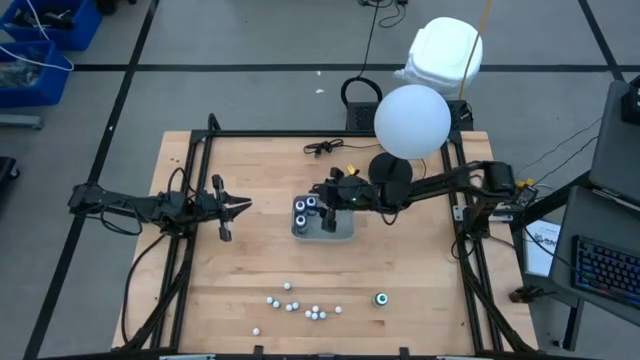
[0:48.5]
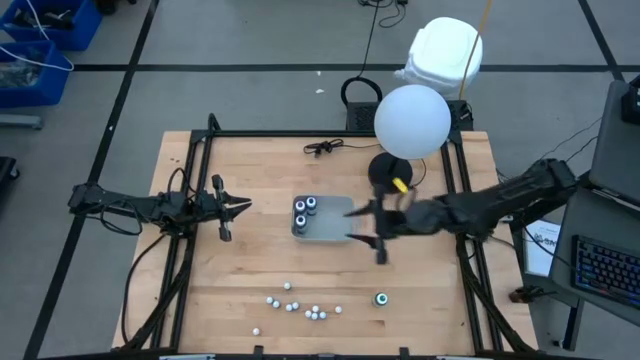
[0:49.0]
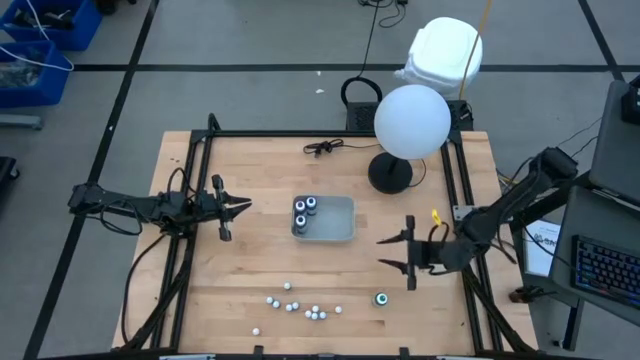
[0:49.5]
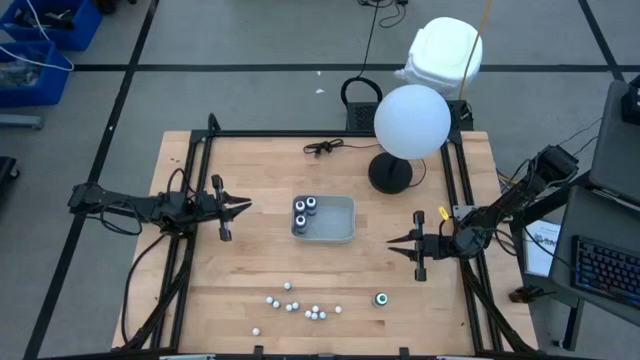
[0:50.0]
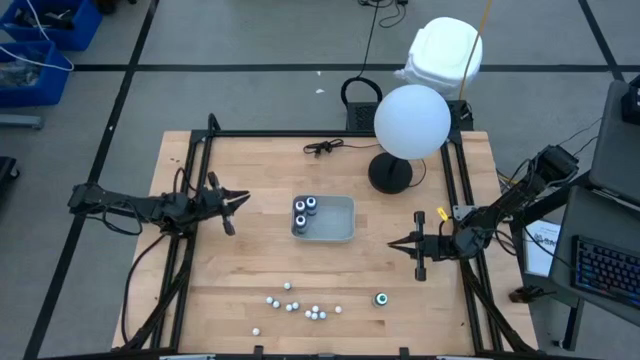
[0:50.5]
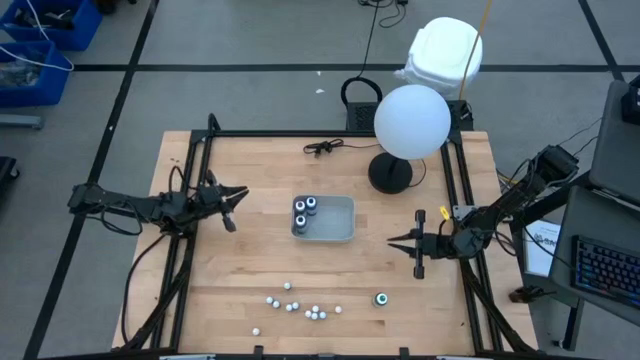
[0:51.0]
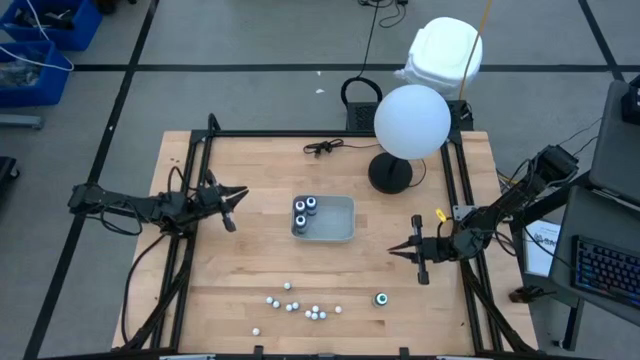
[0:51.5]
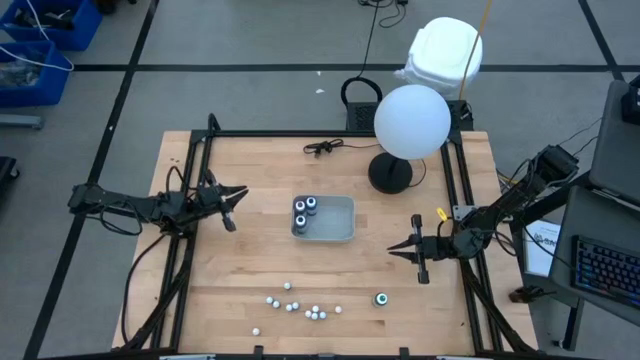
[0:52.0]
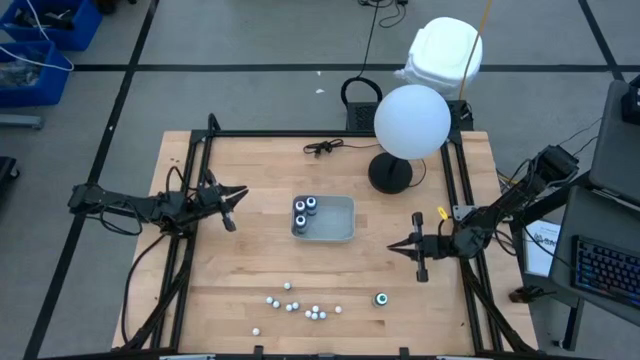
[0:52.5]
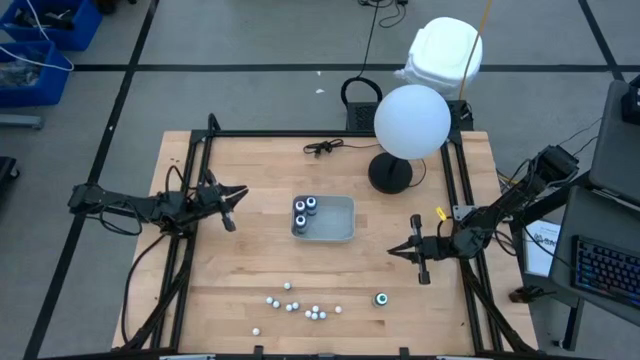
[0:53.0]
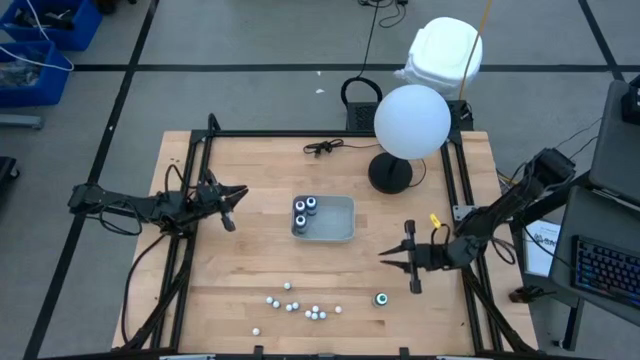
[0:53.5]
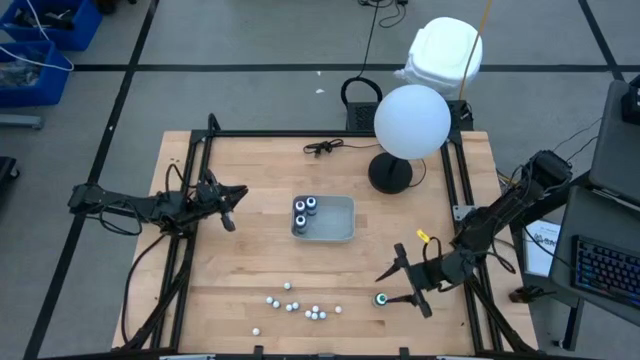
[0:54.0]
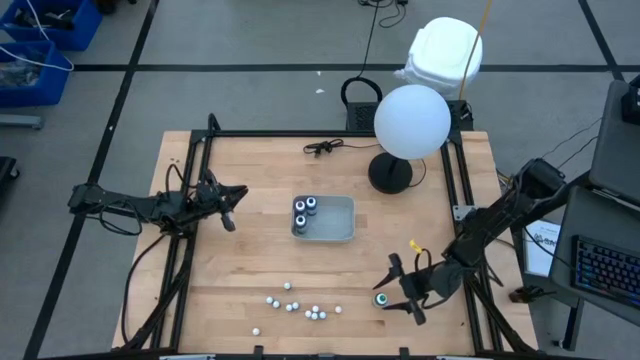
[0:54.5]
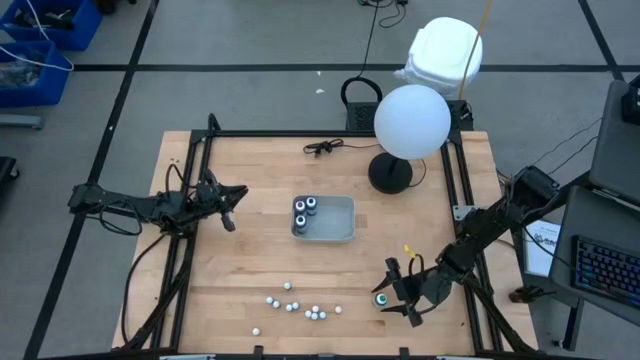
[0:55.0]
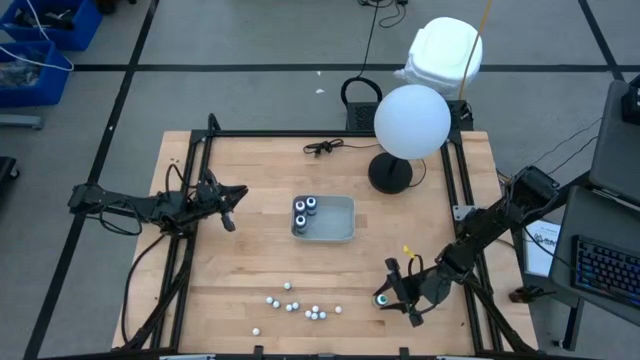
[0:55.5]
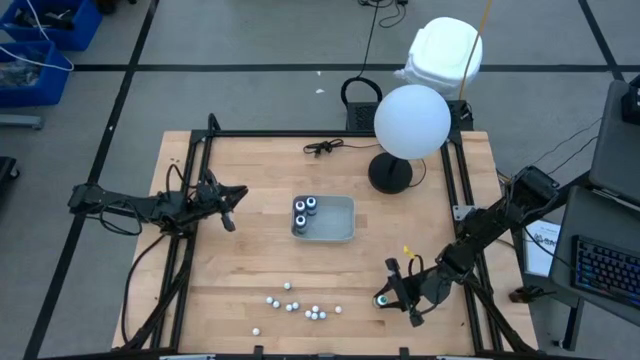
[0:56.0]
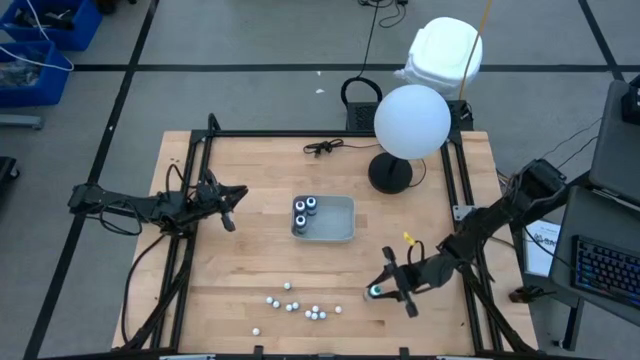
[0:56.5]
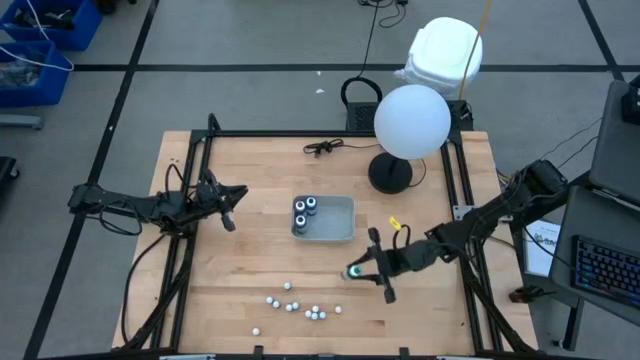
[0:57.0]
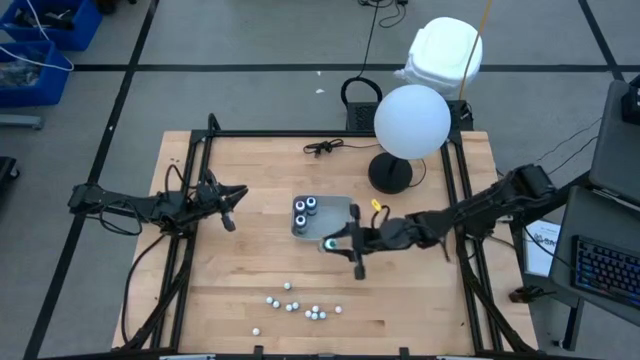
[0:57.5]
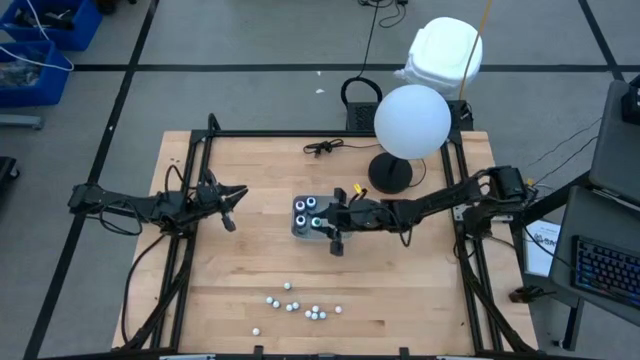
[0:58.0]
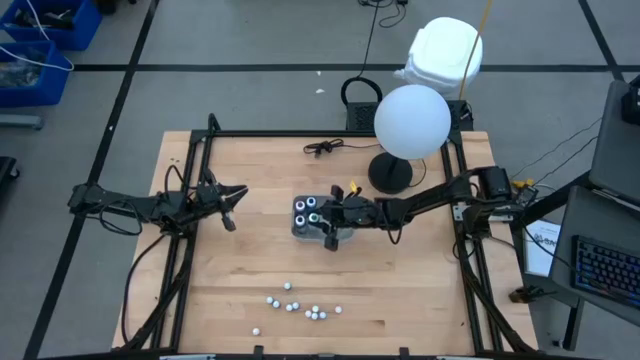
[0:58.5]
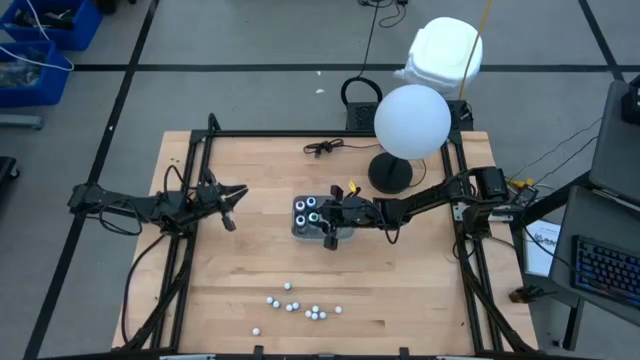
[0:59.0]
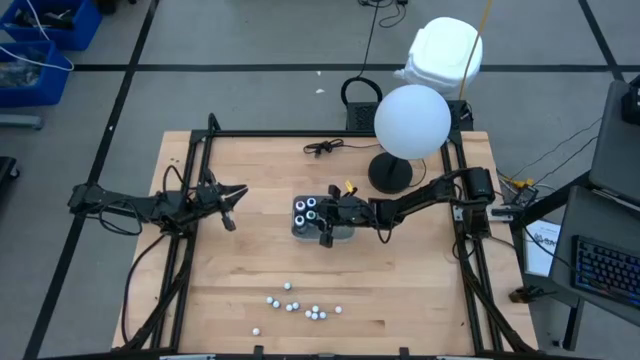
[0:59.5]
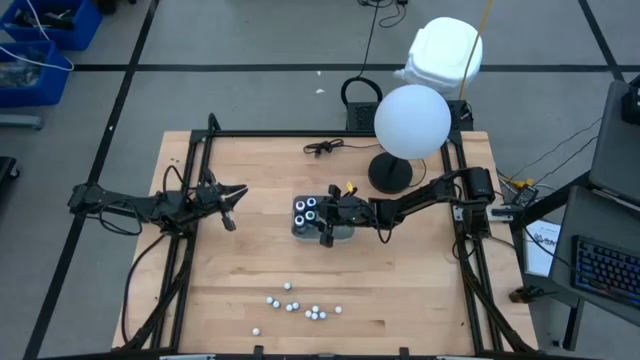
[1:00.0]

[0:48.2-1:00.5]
Task: Pick & Place food coloring
Put the large green food coloring bottle into the gray bin

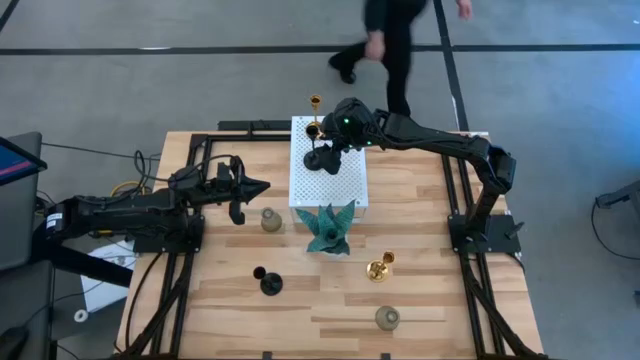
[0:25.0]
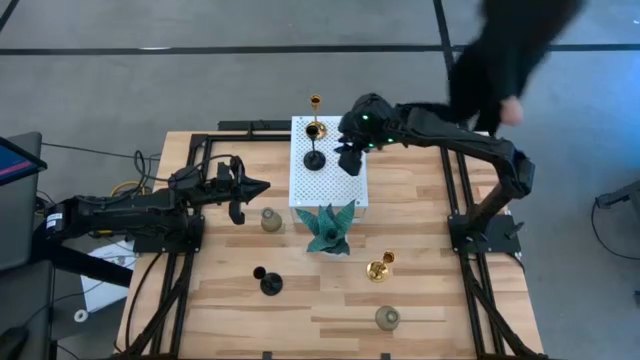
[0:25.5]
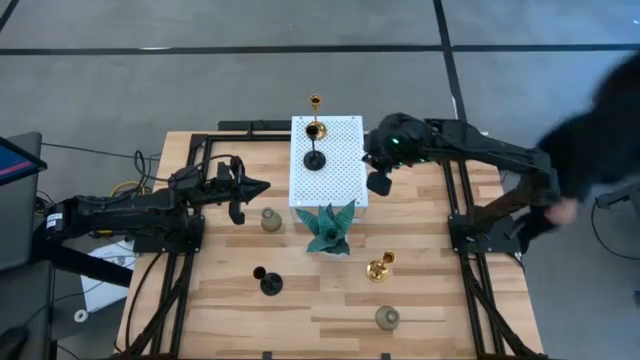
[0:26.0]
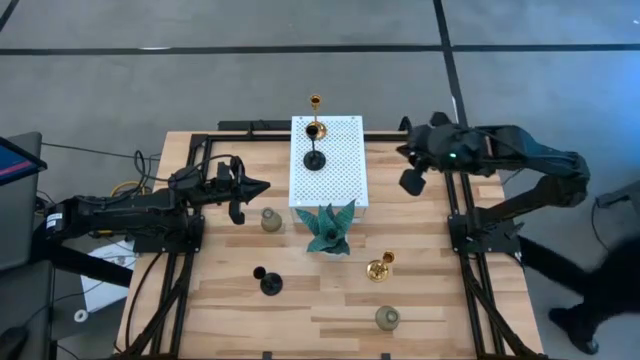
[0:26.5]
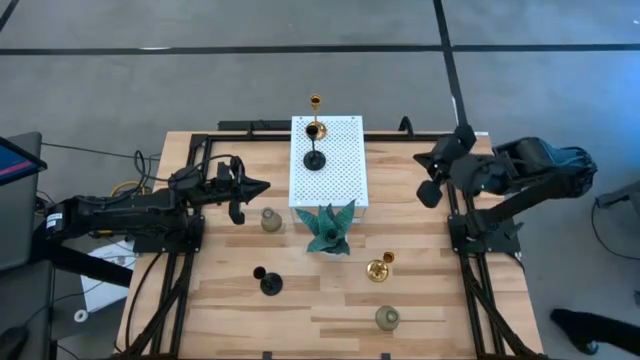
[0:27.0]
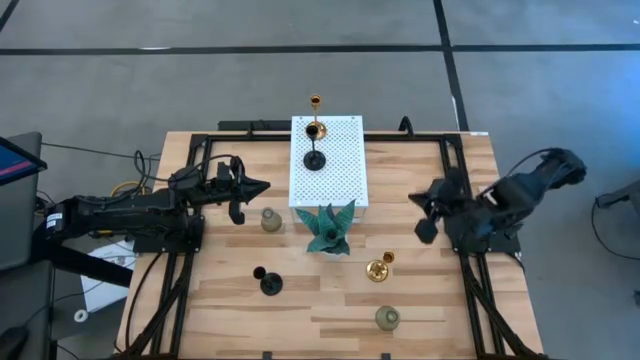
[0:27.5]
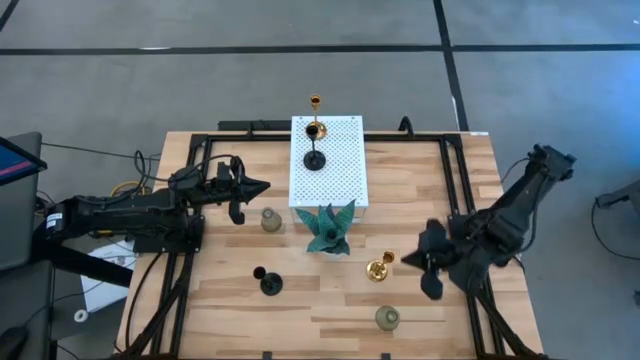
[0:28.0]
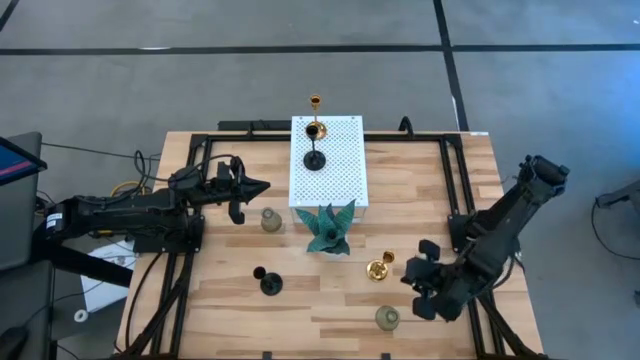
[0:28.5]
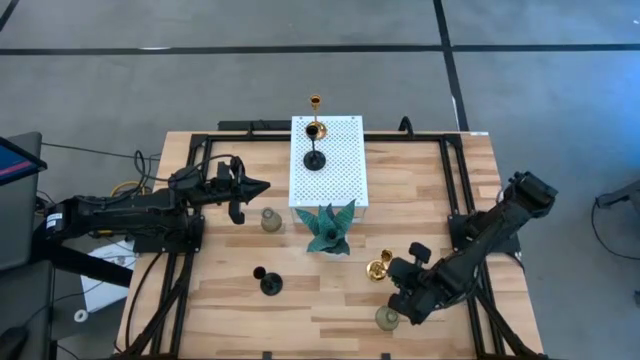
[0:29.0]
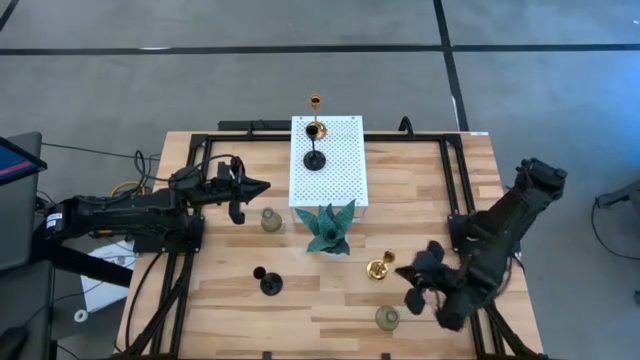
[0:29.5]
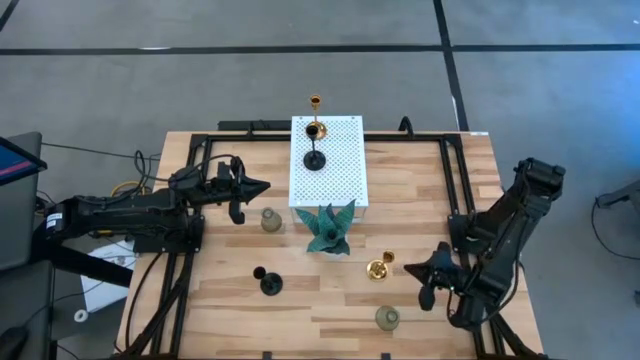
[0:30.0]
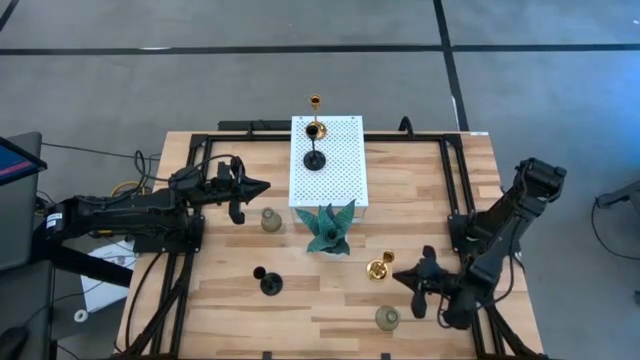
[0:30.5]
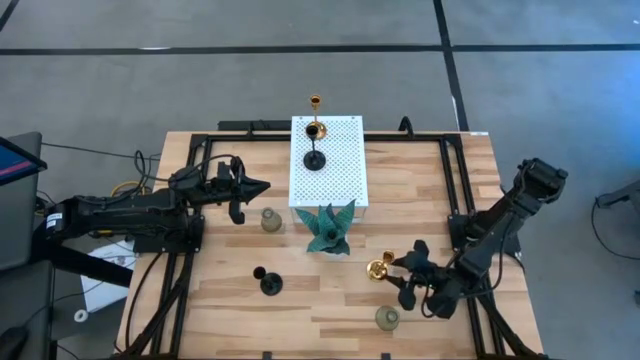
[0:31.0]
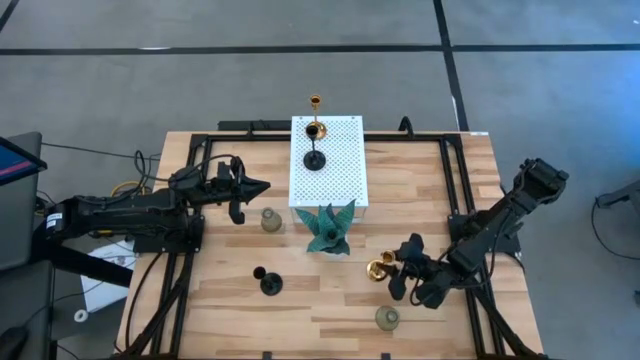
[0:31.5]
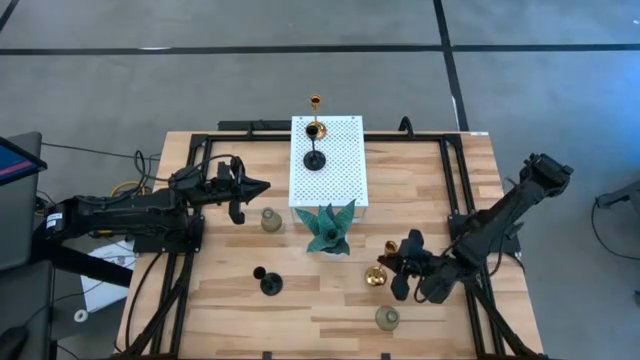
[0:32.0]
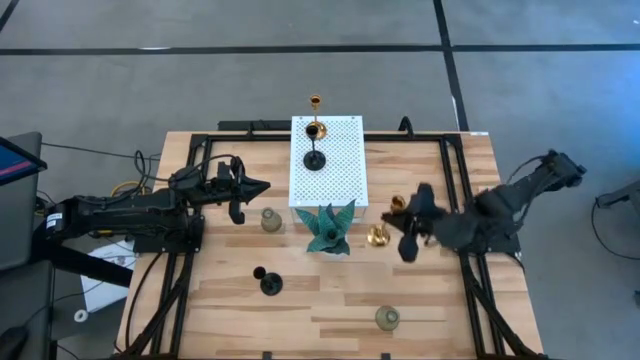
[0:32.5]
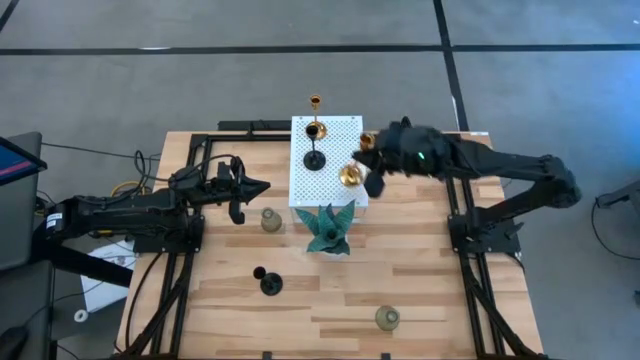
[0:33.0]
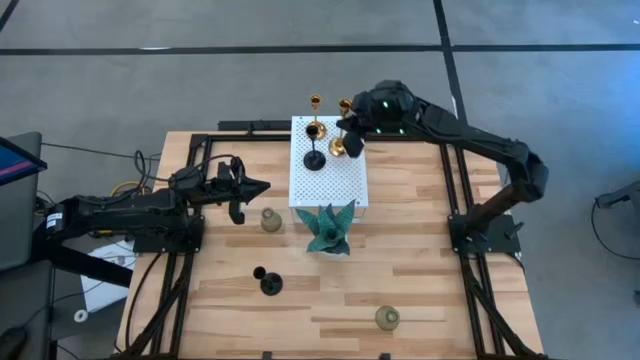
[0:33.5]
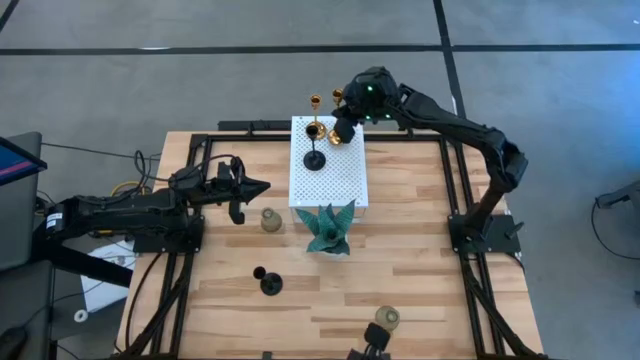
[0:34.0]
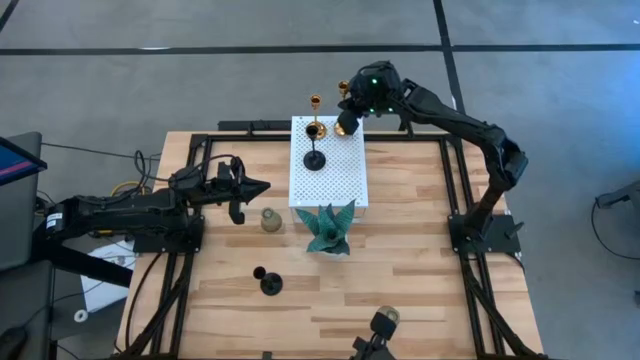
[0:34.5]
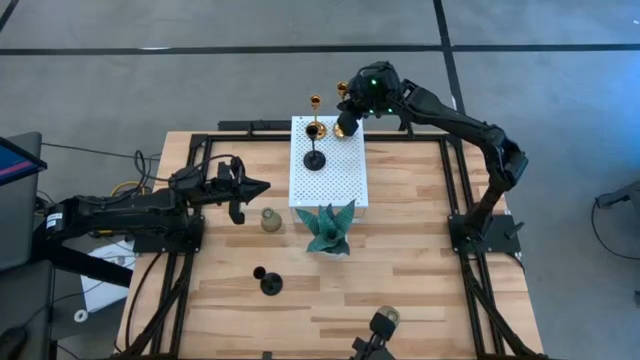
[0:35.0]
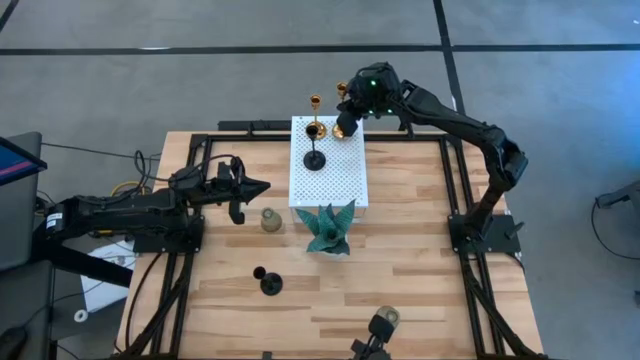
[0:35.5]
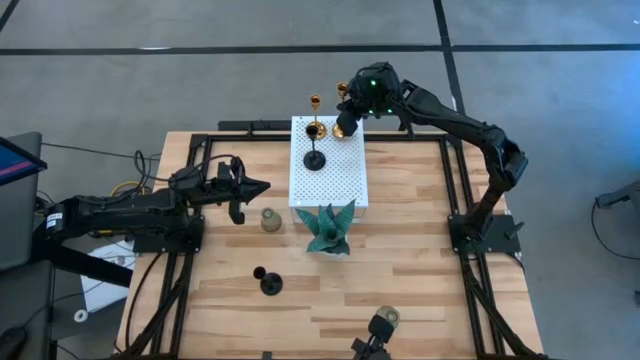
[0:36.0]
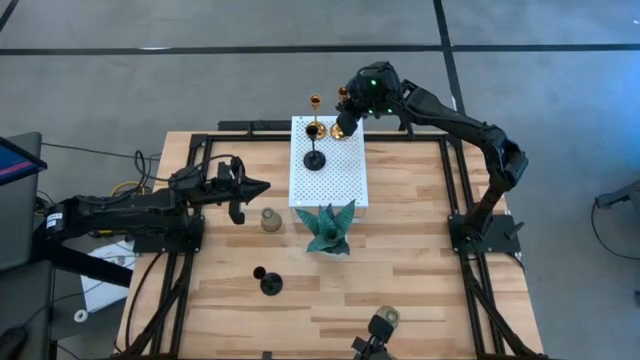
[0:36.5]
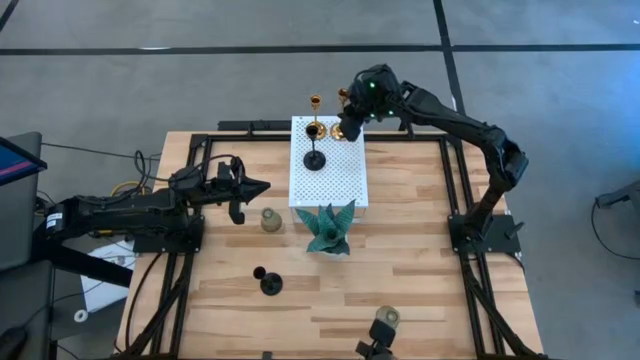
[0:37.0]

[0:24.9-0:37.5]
Task: Pick & Place candle stick holders
Put the gold candle holder on the shelf aligned with the gold candle holder
